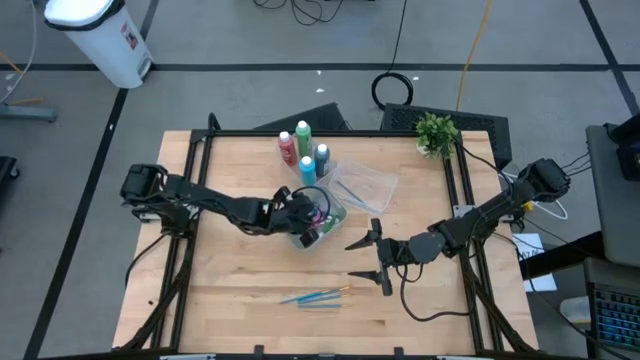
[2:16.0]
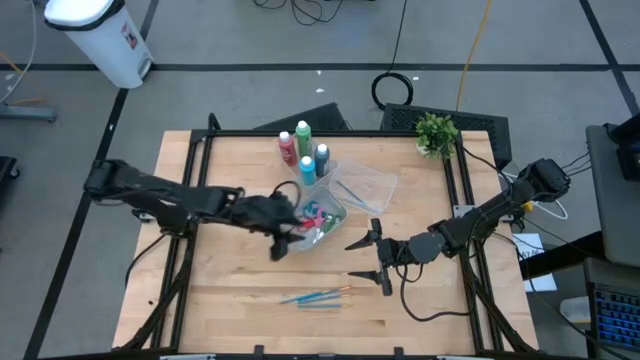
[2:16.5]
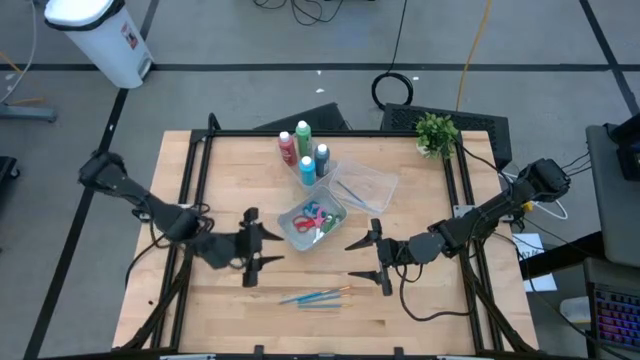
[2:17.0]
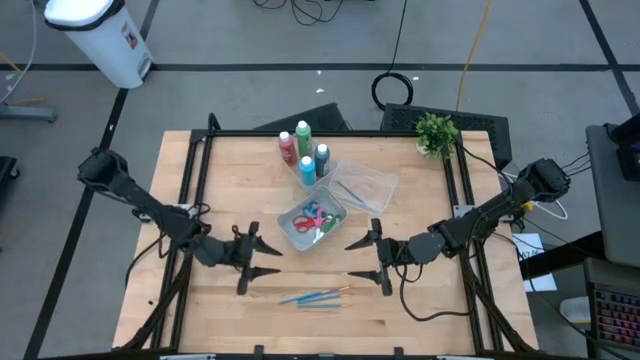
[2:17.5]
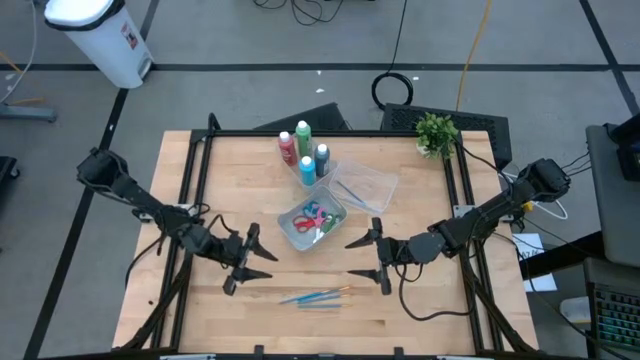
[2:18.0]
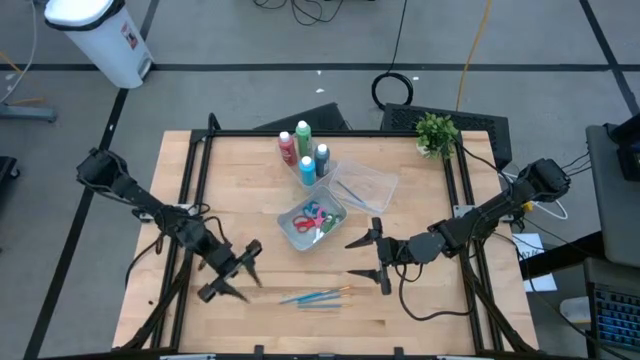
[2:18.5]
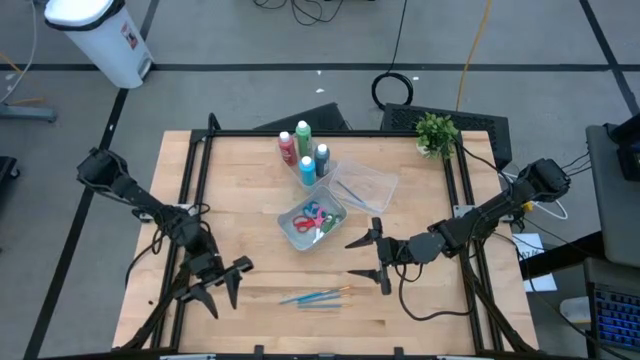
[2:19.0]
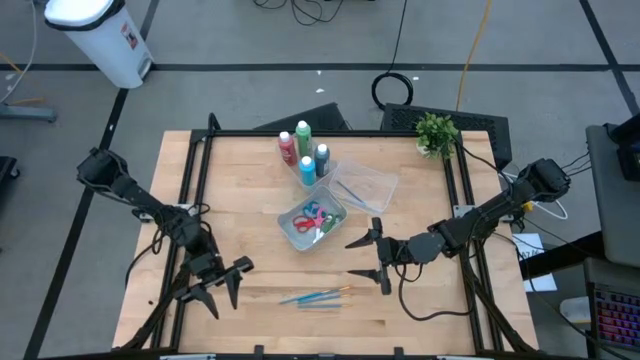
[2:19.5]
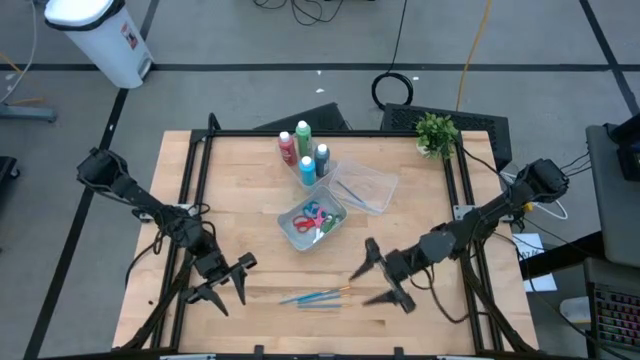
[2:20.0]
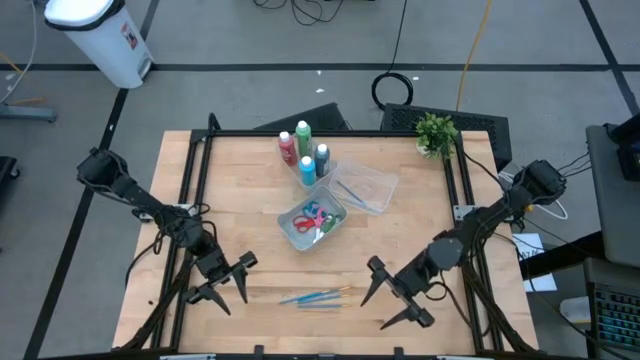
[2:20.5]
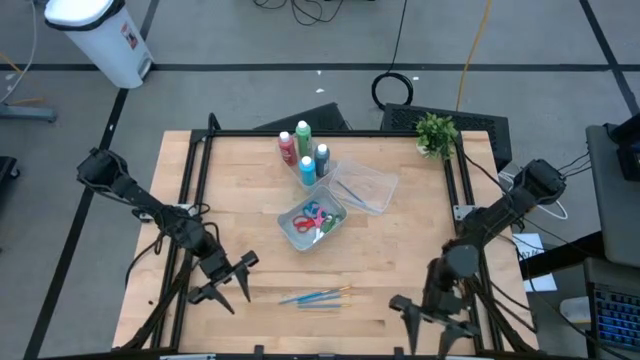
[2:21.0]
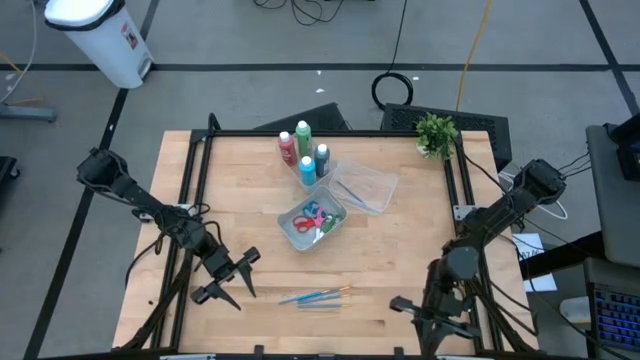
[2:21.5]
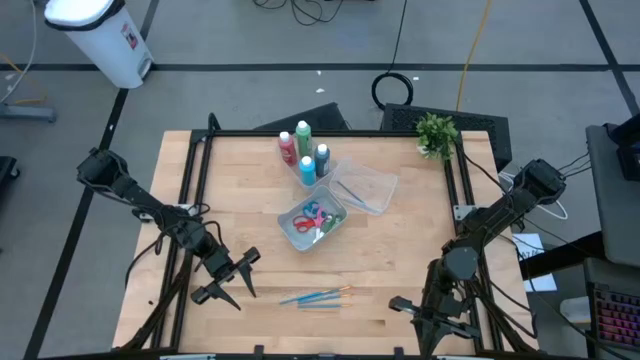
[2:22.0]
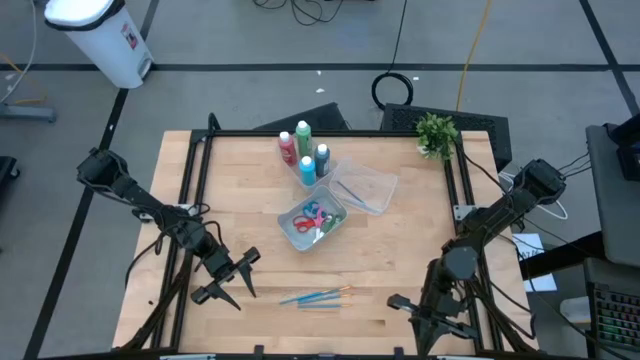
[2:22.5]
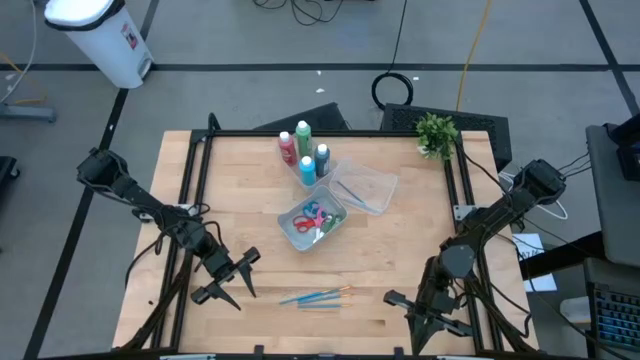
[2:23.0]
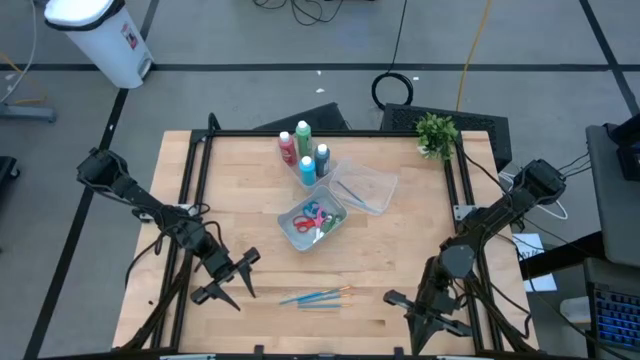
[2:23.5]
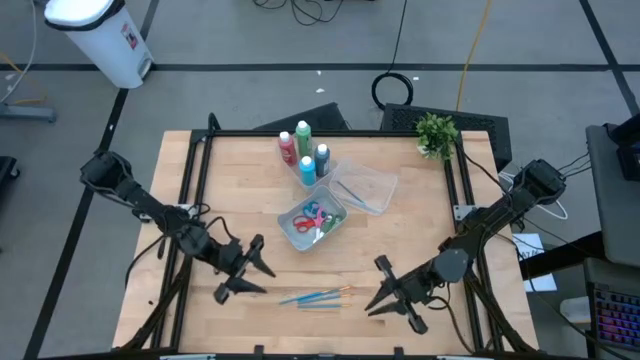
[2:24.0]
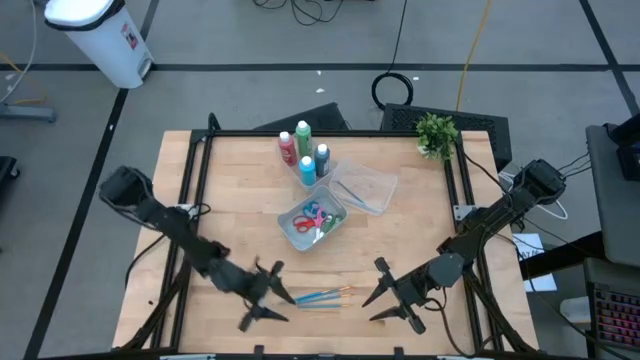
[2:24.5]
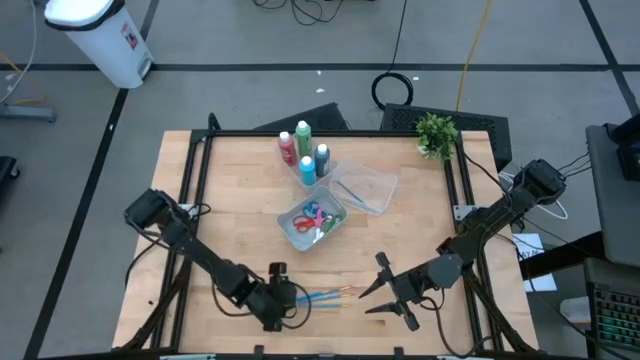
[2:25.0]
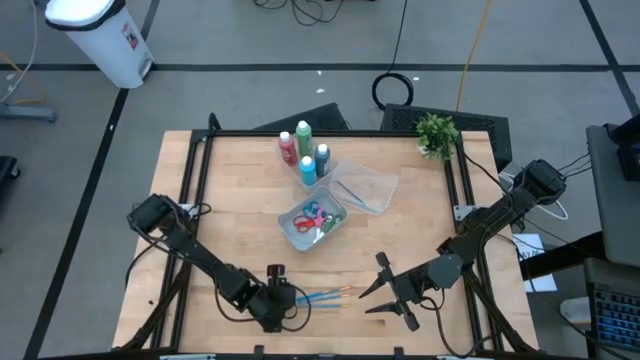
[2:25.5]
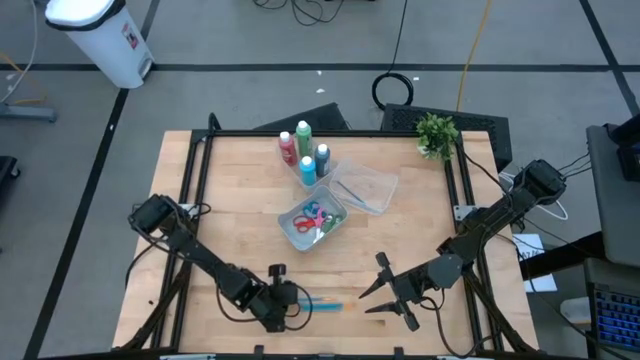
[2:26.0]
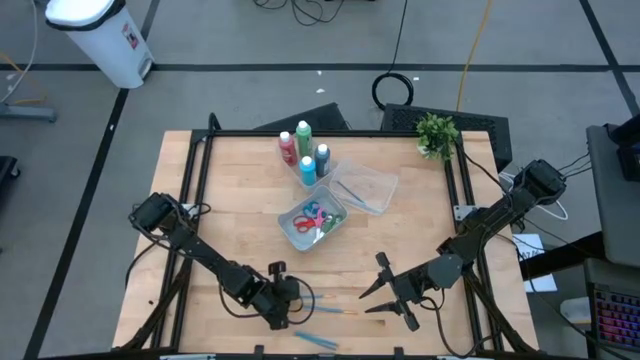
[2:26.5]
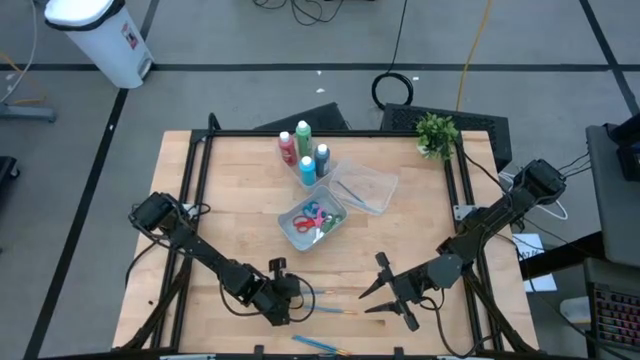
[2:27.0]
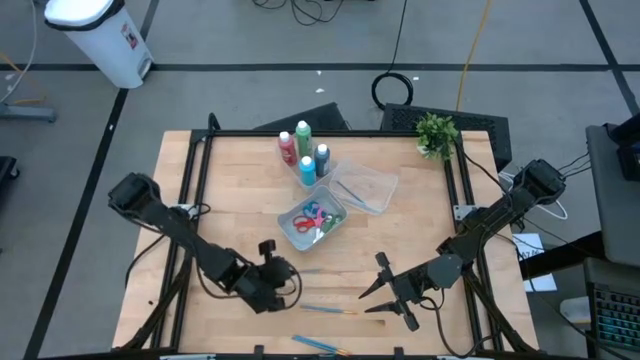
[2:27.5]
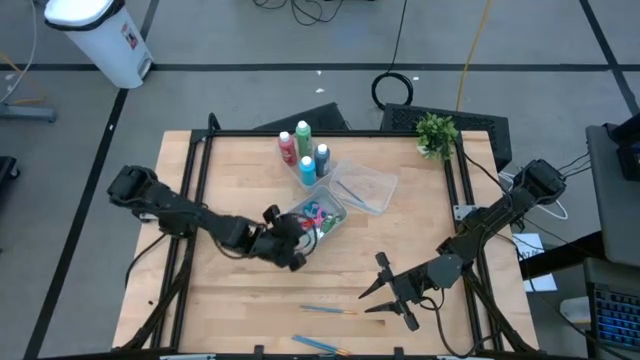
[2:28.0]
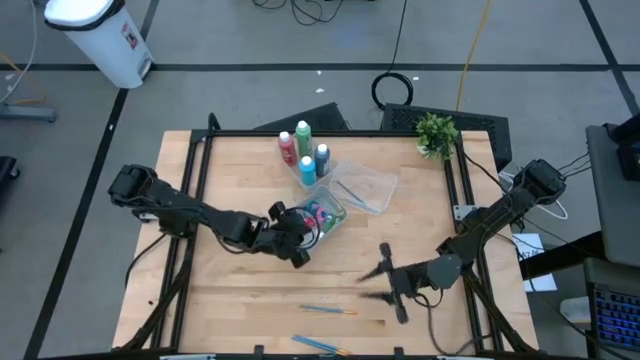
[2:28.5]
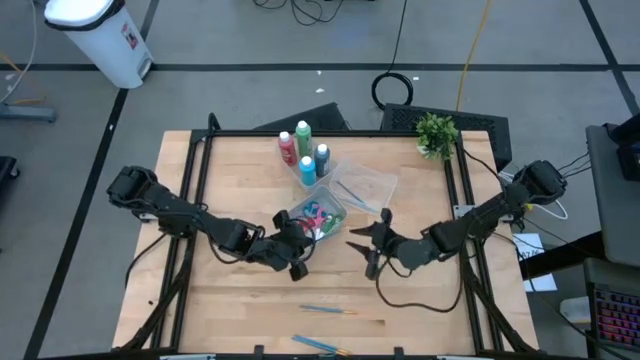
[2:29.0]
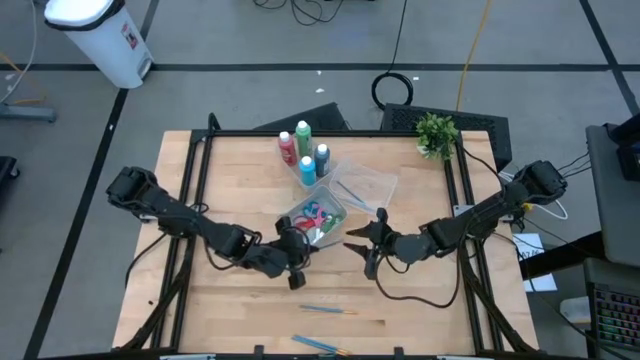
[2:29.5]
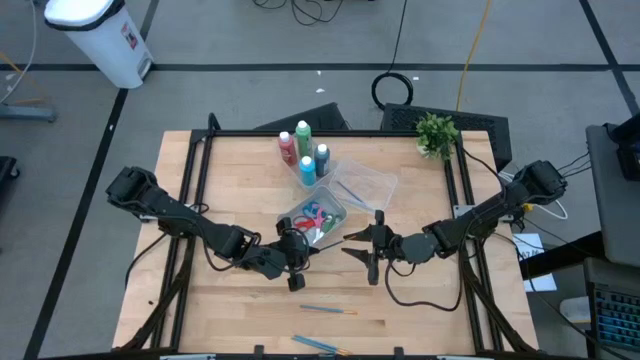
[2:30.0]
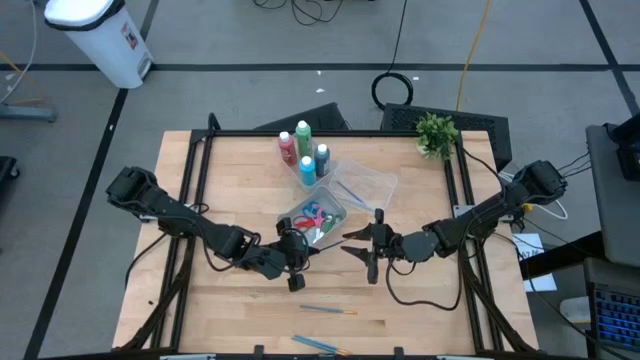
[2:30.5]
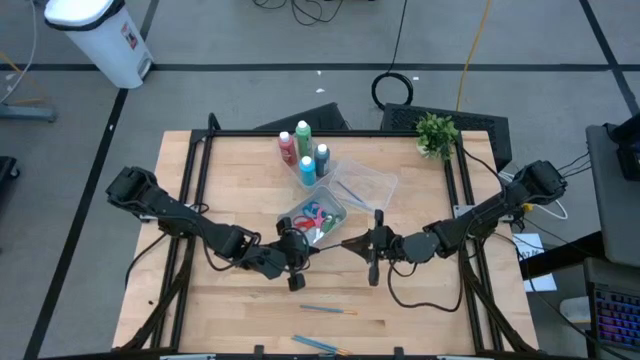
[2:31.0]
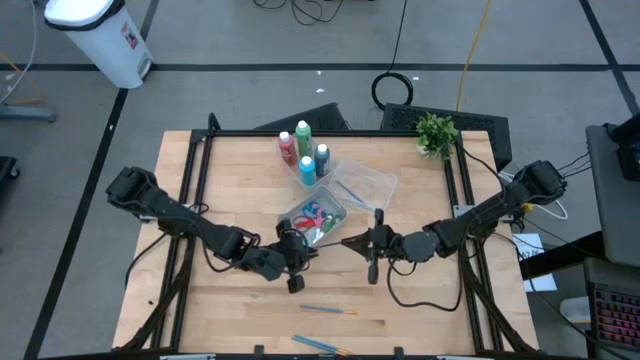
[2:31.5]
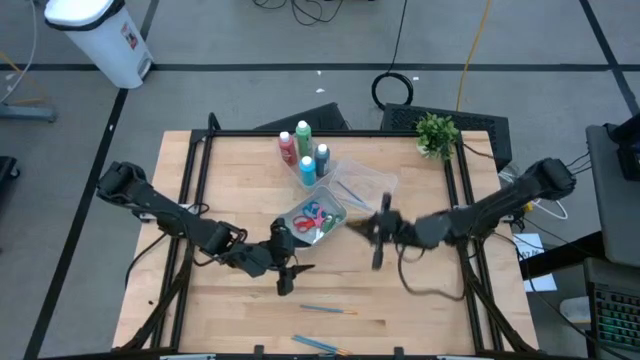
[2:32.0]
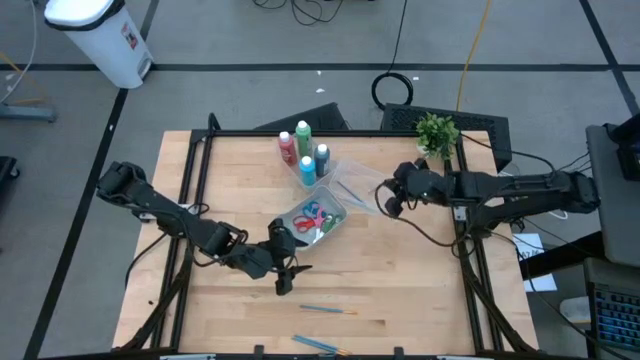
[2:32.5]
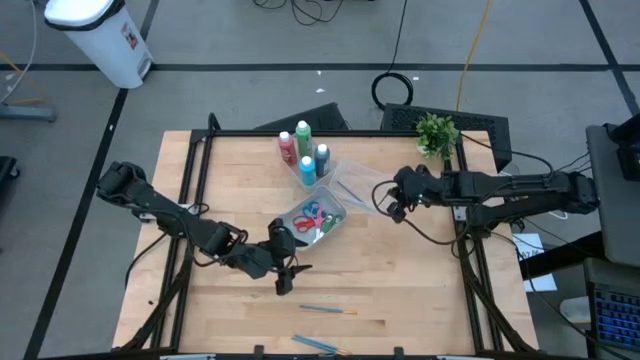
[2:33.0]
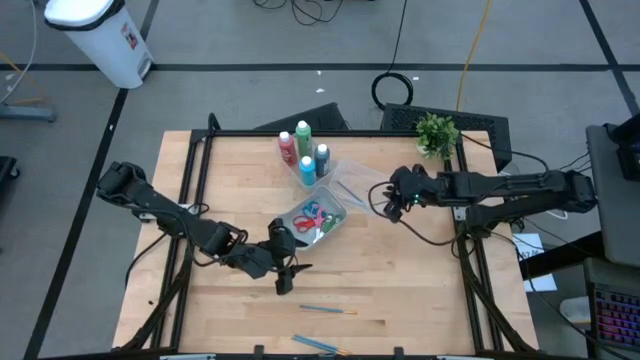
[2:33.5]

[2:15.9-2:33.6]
Task: Pick & Place Paint Supplies
Put the blue paintbrush into the right transparent bin

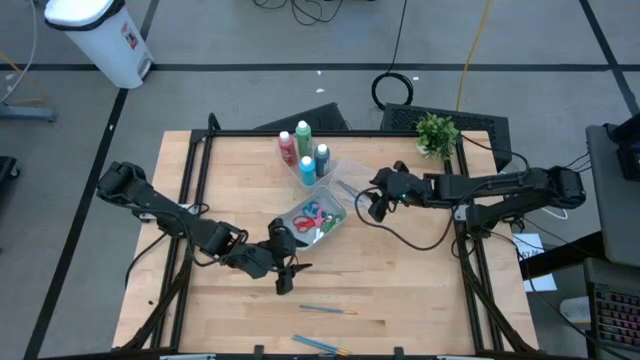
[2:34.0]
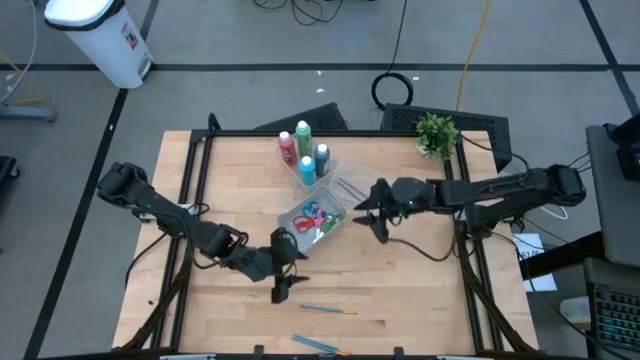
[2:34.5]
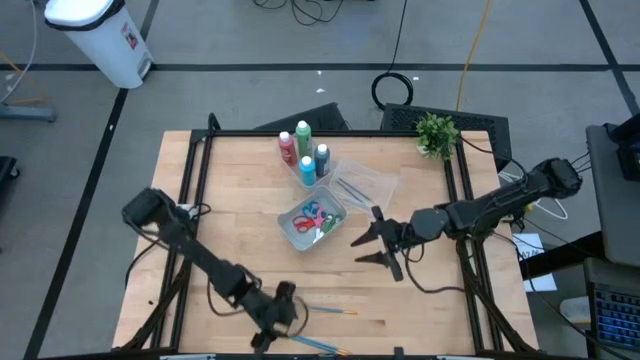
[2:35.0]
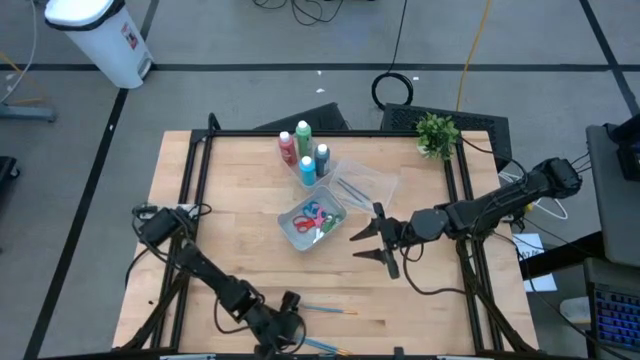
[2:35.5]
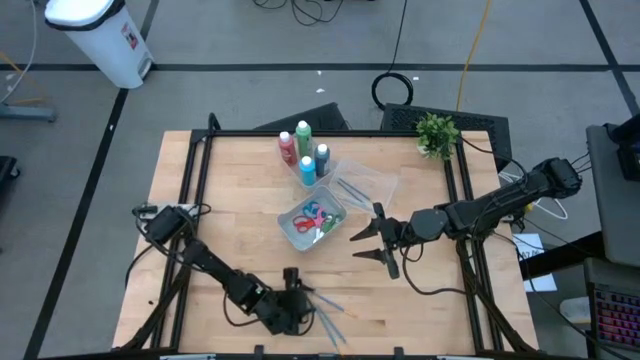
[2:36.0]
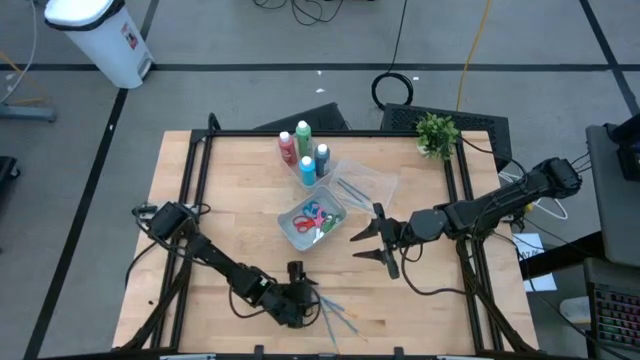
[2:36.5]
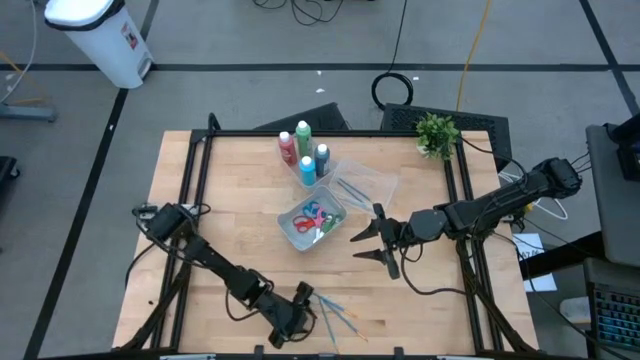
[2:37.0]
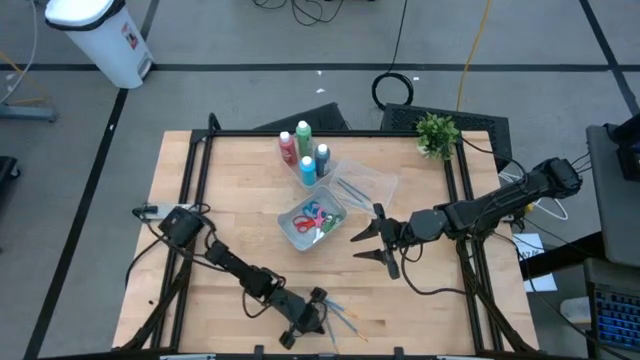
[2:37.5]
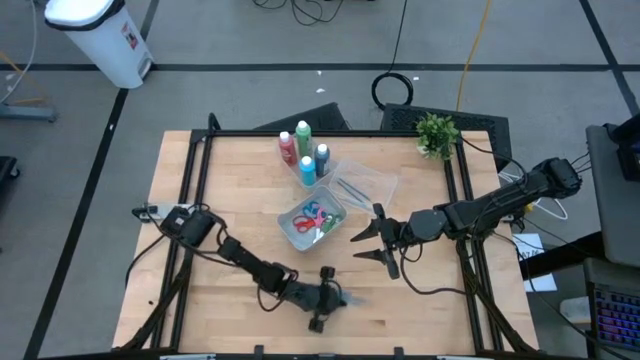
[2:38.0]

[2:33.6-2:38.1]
Adjust the blue paintbrush on the table
